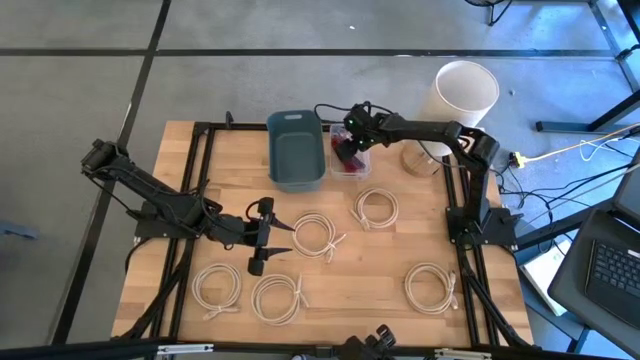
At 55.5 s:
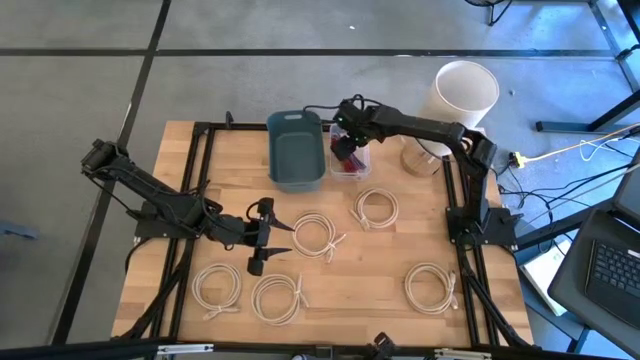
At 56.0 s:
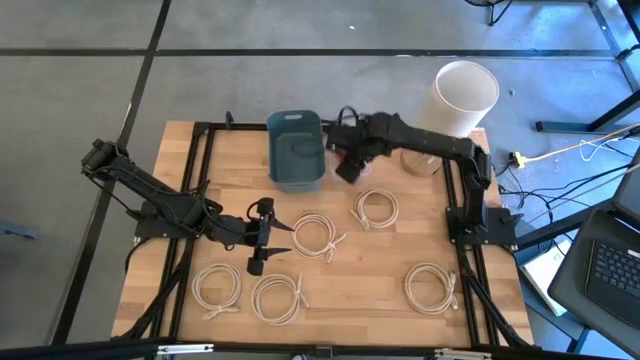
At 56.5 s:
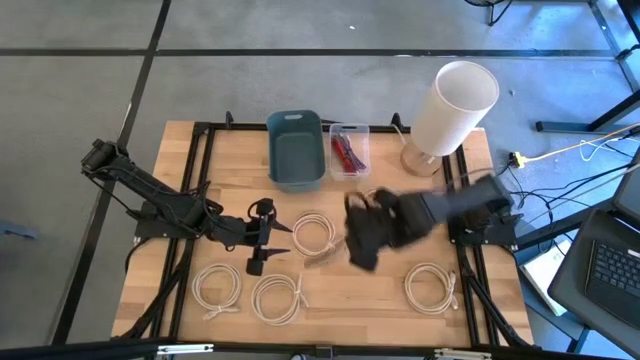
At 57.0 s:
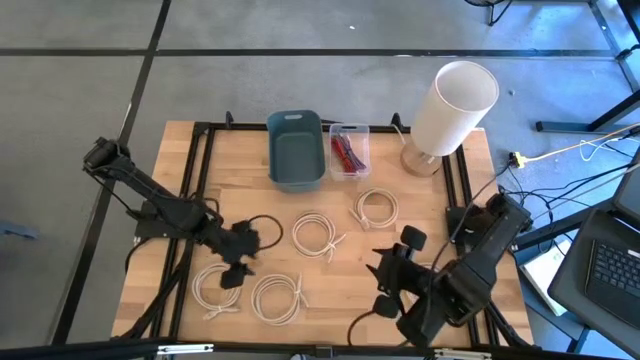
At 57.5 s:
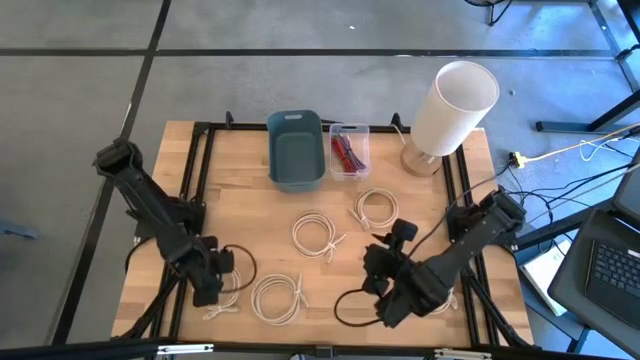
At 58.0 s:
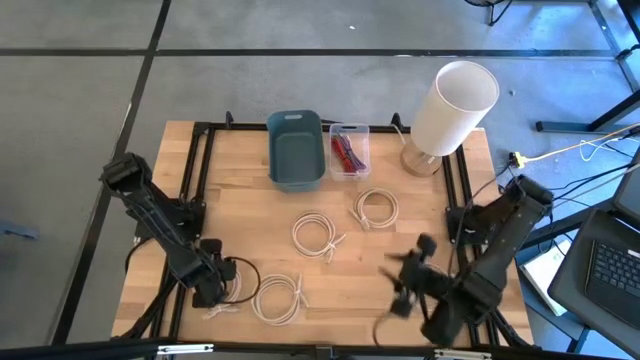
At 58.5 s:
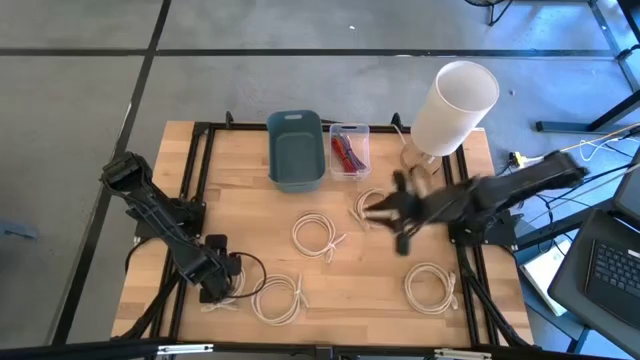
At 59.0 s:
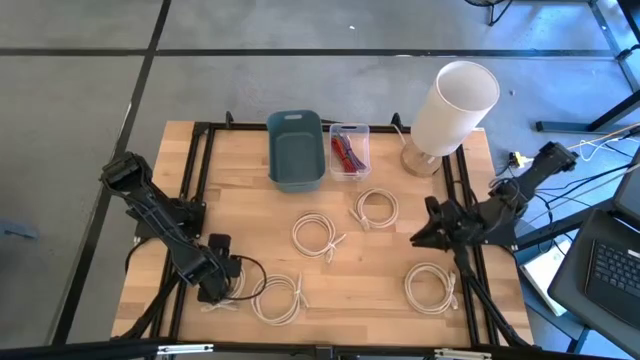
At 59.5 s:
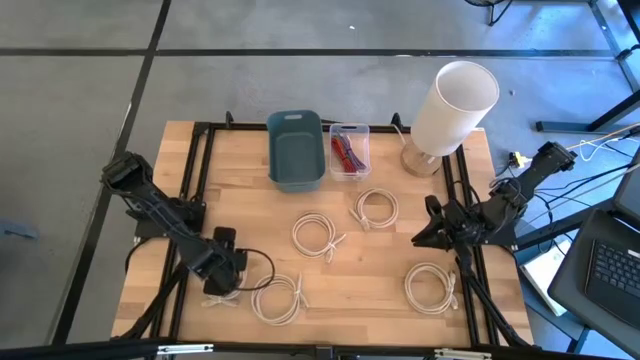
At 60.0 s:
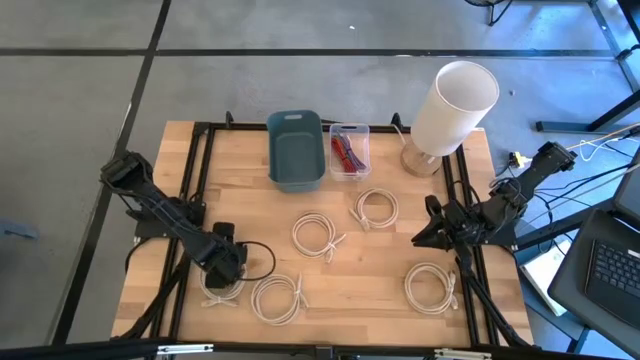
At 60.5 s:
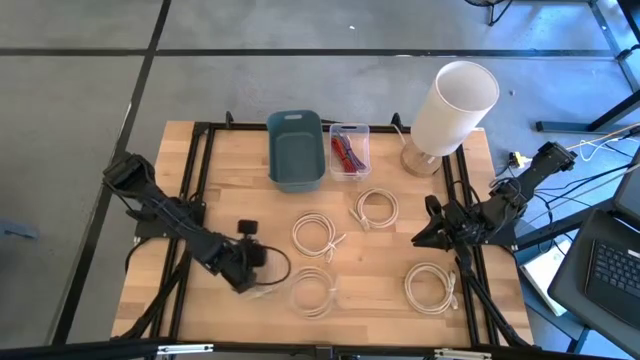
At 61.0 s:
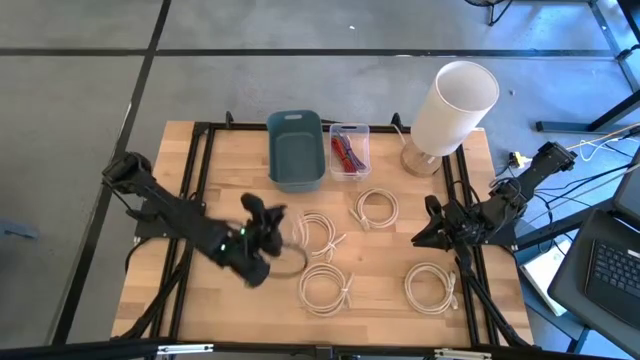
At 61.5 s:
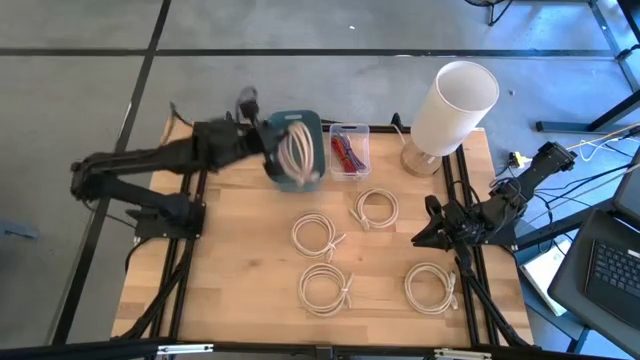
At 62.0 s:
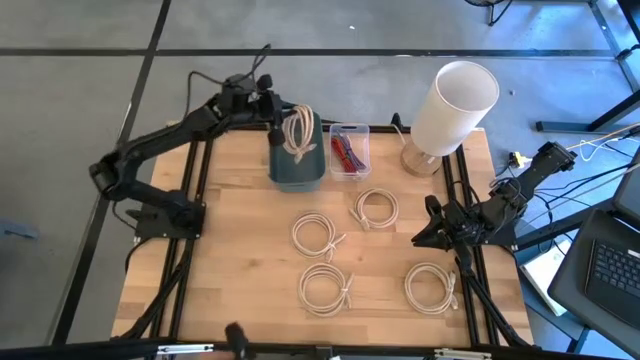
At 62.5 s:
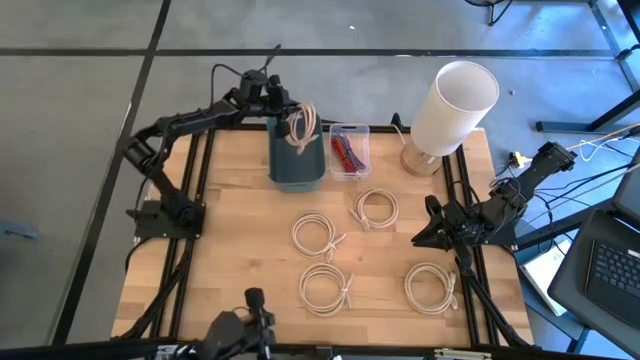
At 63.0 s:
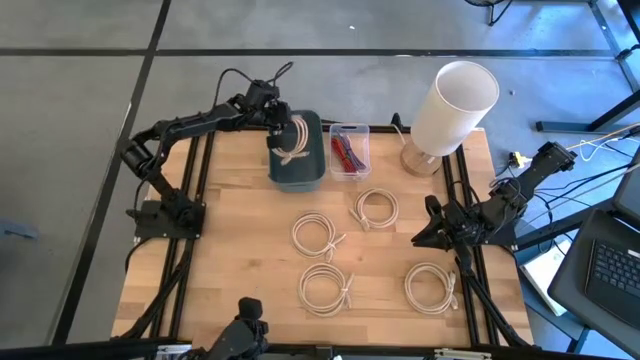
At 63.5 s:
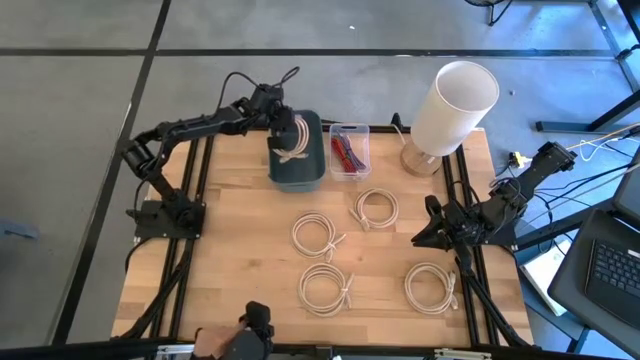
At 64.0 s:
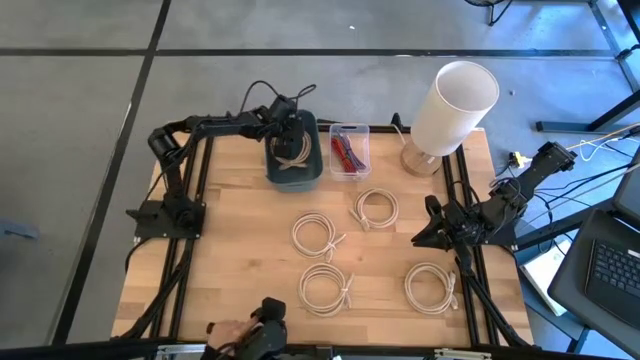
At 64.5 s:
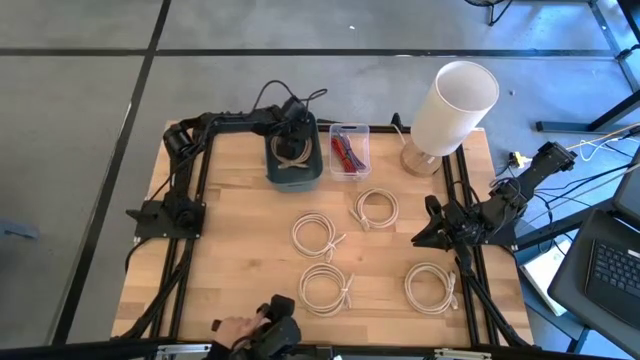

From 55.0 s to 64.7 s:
Put the bottom left white HDMI cable into the dark blue bin

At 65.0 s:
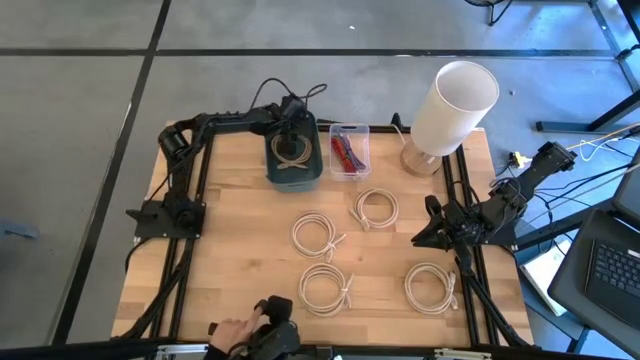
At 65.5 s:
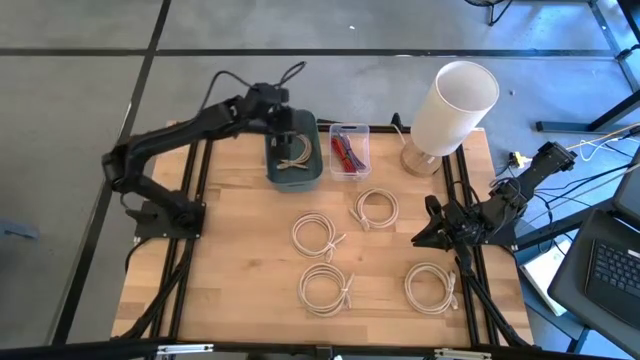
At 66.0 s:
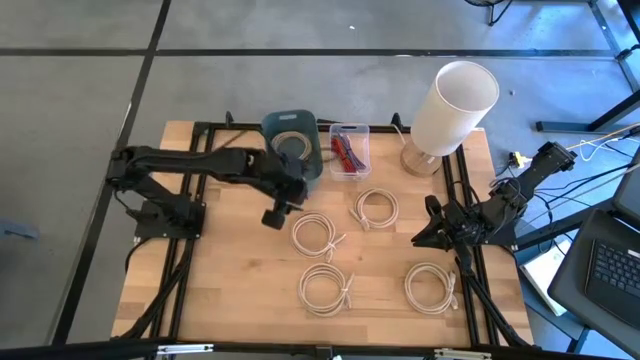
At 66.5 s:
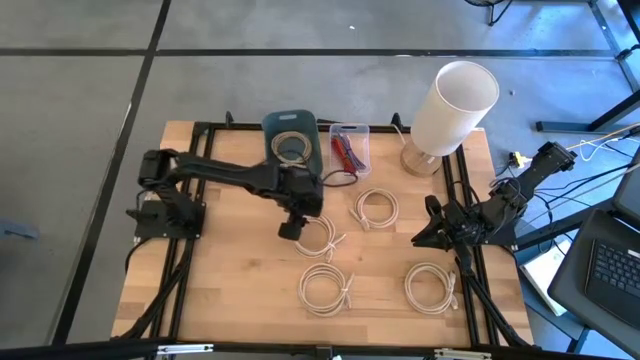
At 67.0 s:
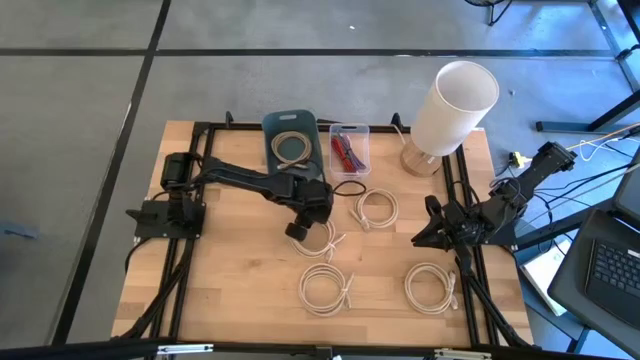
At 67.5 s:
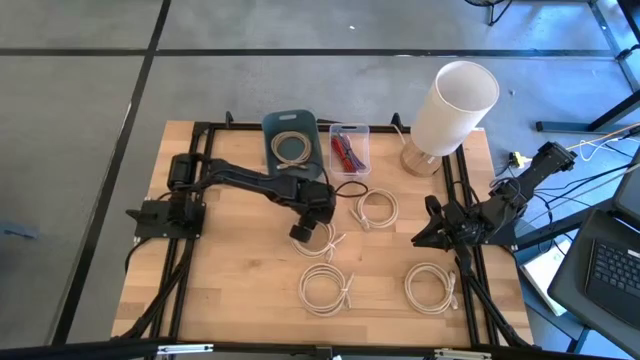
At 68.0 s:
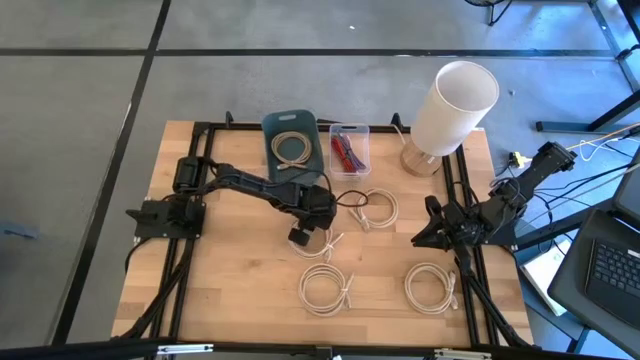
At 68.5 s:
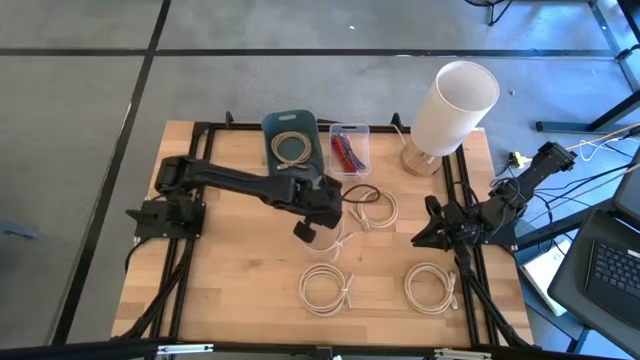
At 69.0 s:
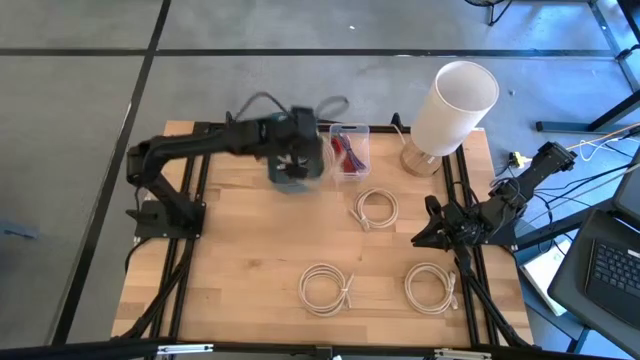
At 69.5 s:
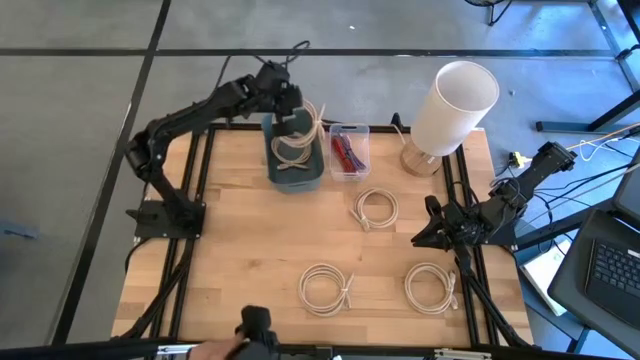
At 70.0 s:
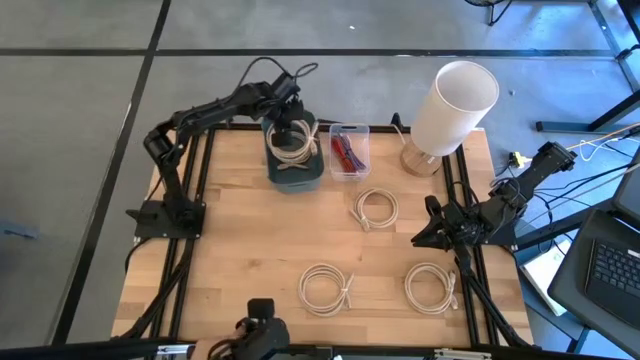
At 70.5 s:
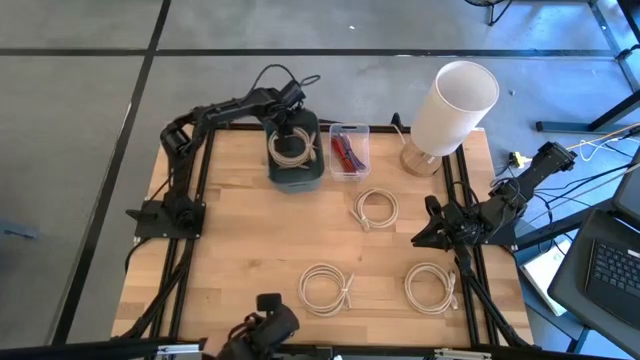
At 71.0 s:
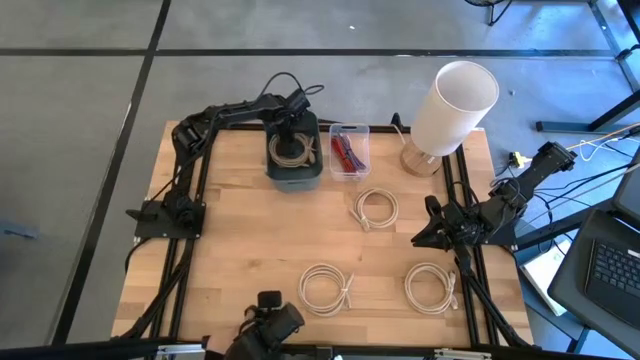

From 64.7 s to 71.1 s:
Put the white HDMI cable into the dark blue bin

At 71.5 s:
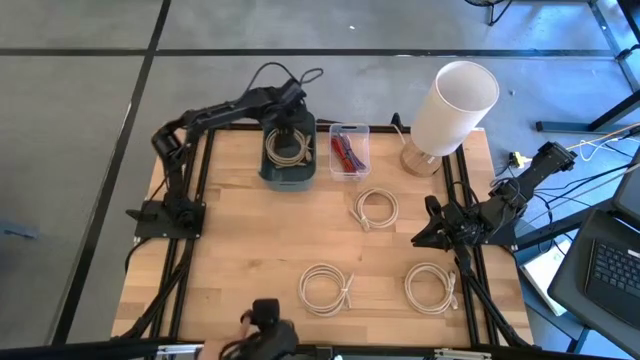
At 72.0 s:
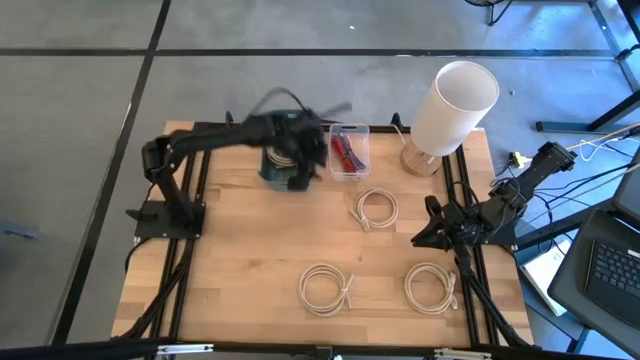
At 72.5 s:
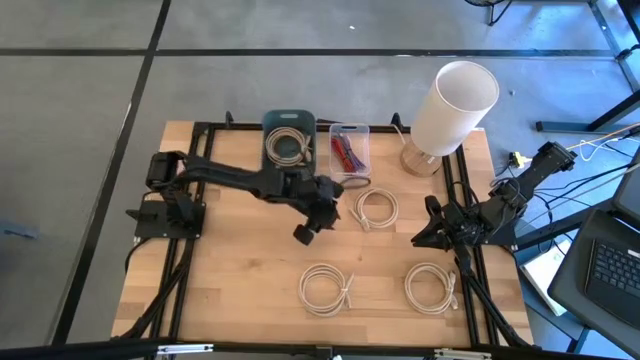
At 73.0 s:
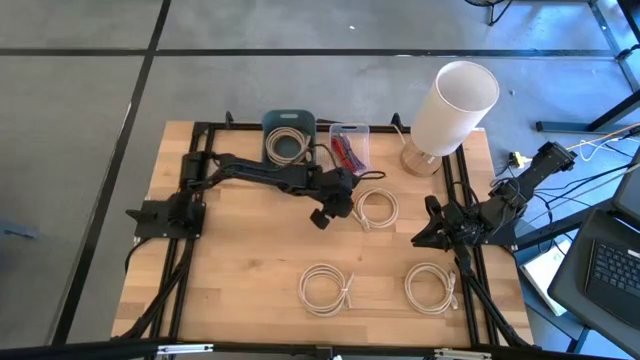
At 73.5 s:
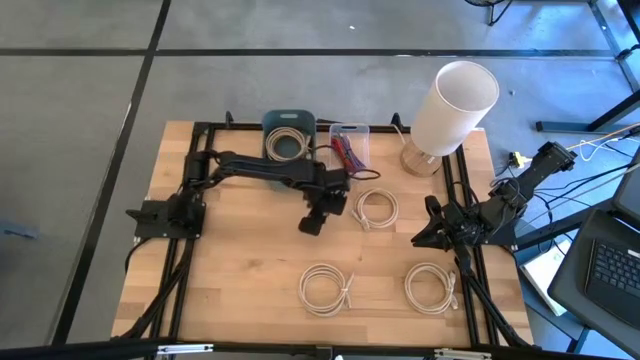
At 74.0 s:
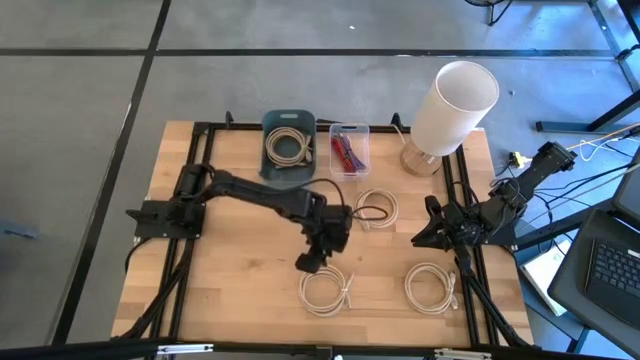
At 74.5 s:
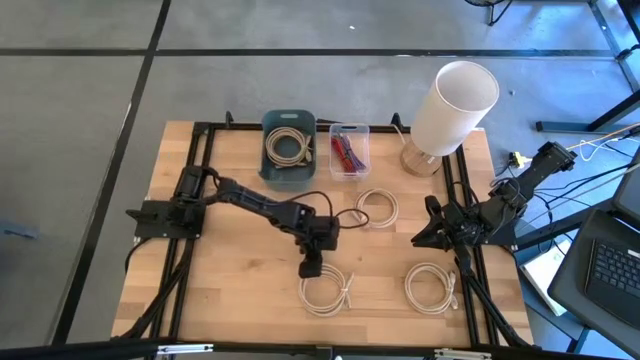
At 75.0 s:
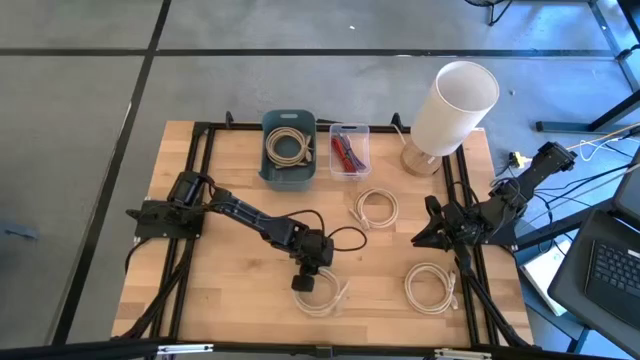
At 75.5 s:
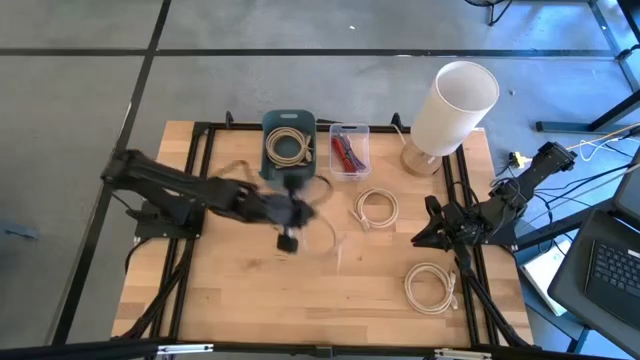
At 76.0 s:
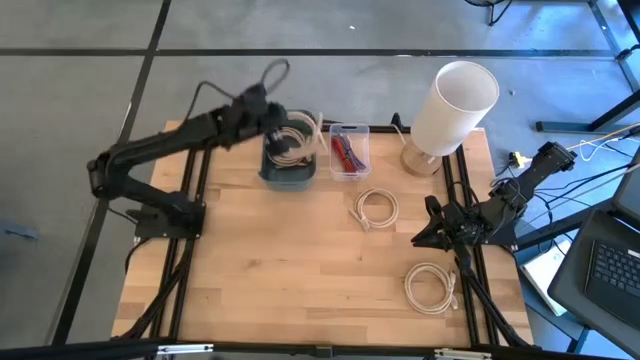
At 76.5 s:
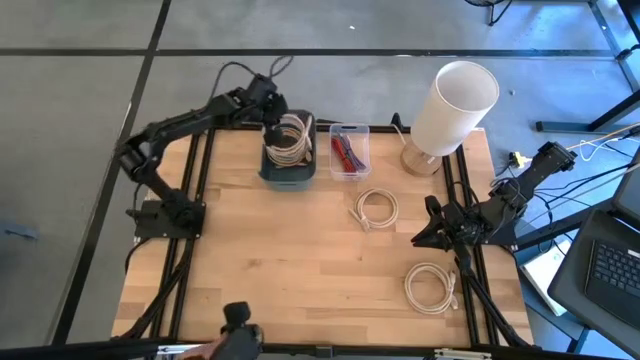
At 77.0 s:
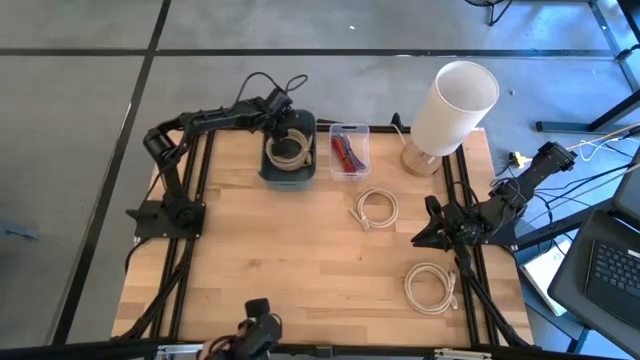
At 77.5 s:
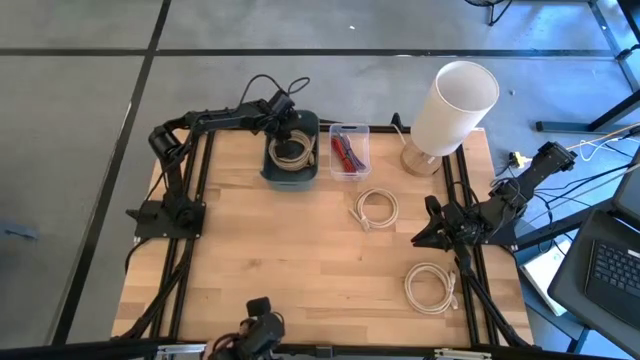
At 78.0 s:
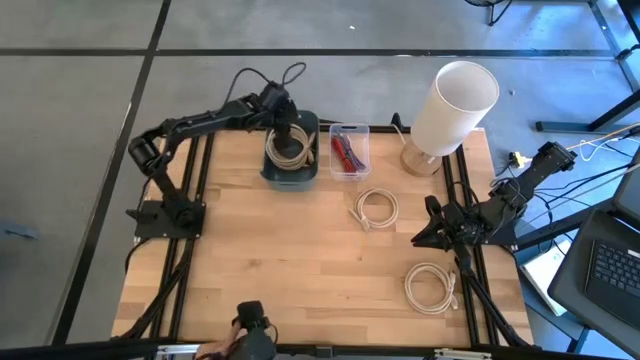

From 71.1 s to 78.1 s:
Put the white HDMI cable into the dark blue bin
